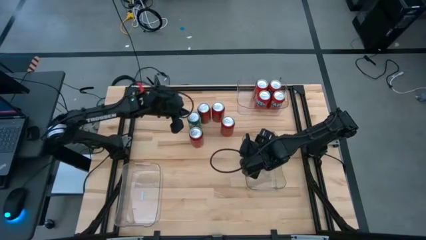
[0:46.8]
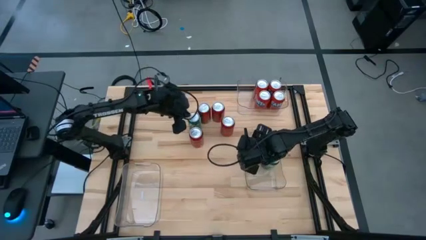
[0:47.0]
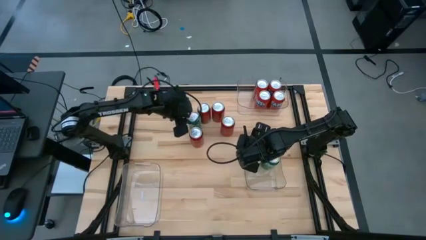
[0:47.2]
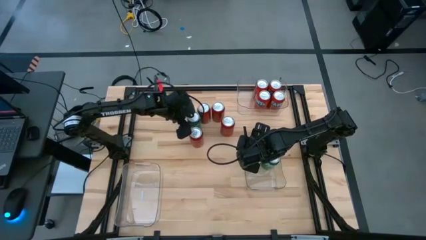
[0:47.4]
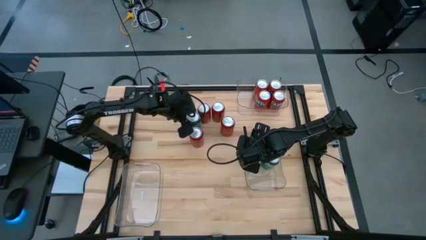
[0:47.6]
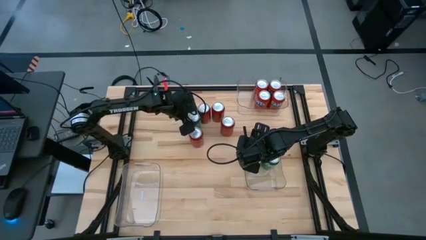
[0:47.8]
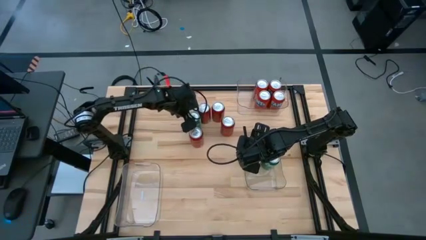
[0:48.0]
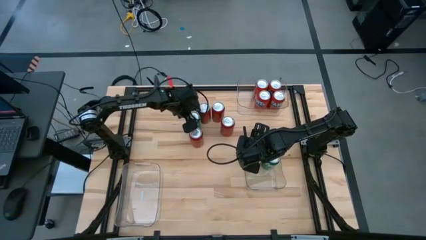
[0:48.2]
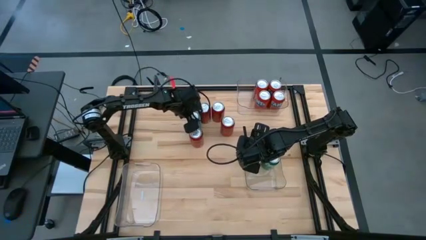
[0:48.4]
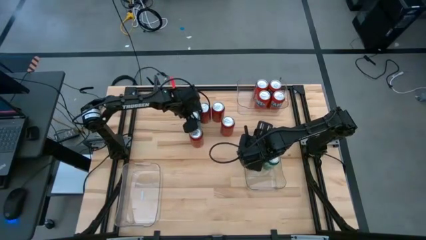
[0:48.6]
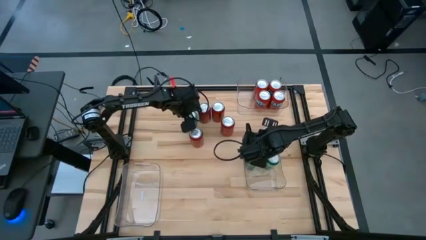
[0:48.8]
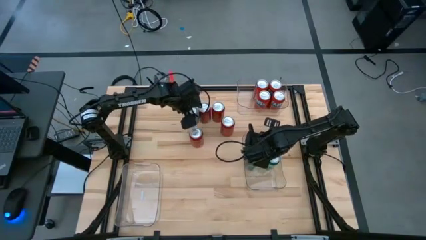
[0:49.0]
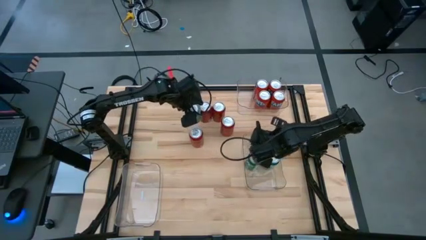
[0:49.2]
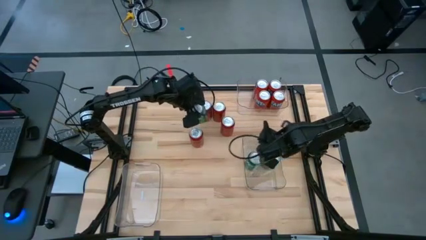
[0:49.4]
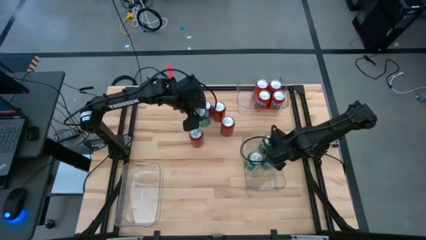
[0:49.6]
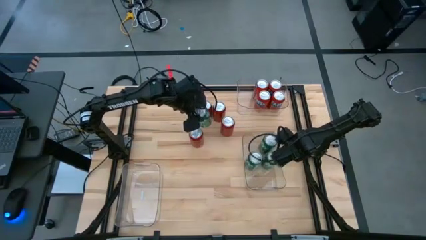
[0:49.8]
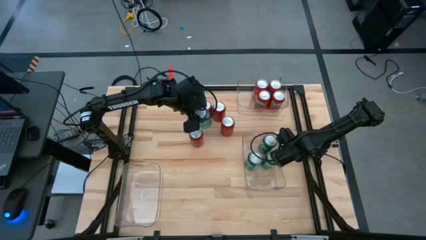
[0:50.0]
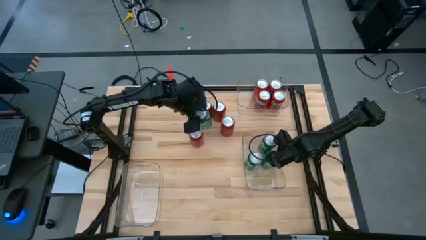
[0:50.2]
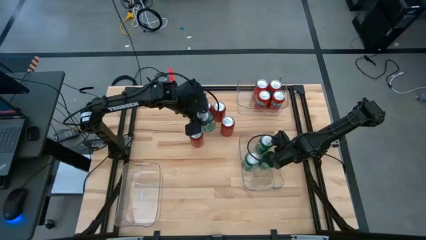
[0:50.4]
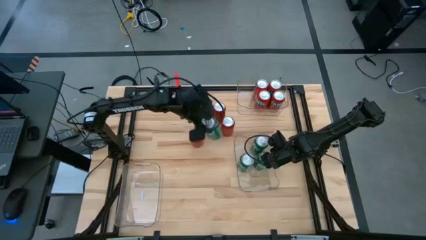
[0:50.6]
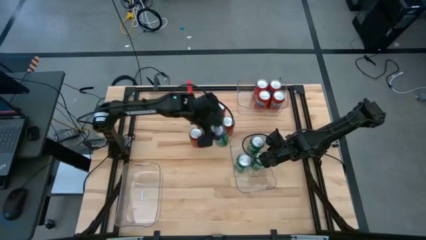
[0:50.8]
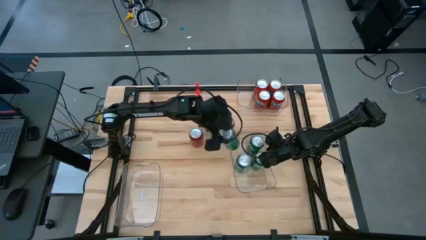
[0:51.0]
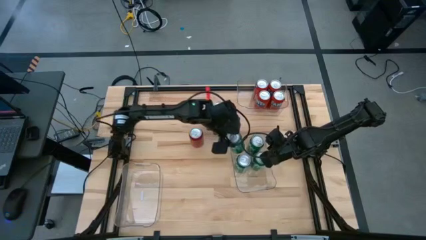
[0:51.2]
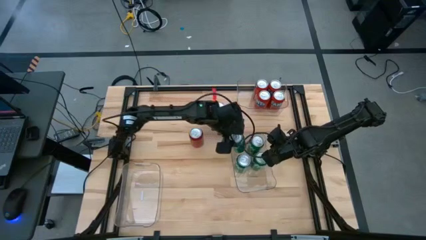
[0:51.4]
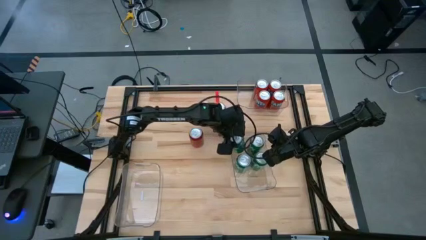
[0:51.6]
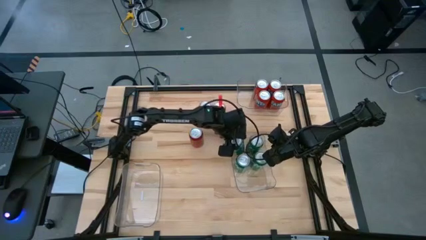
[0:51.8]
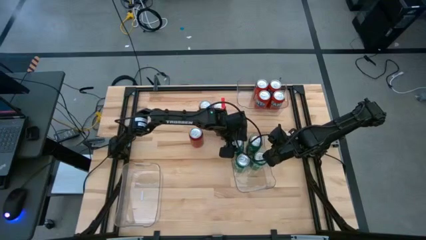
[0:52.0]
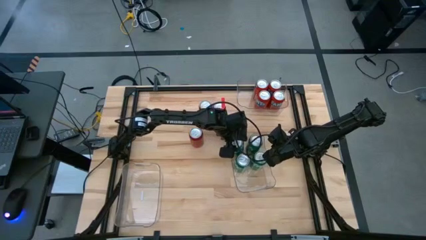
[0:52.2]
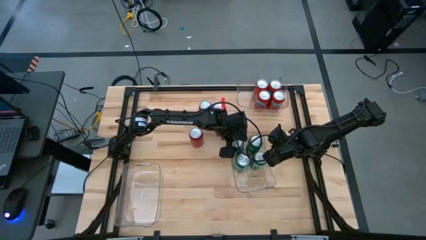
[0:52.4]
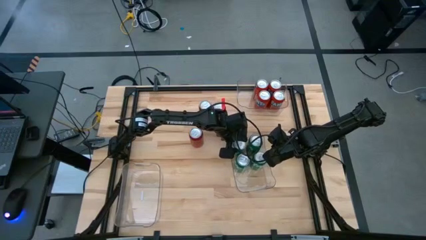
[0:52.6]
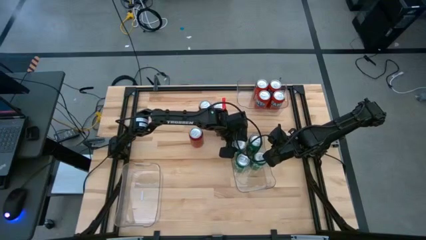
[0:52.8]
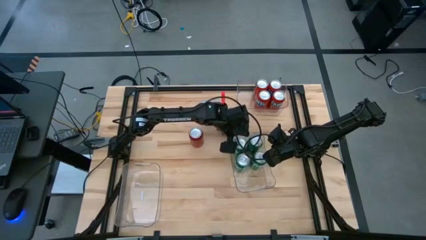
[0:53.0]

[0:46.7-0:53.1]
Task: Sort soda cans
Put the green soda can into the bottom right transparent bin

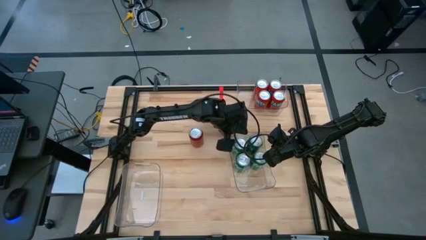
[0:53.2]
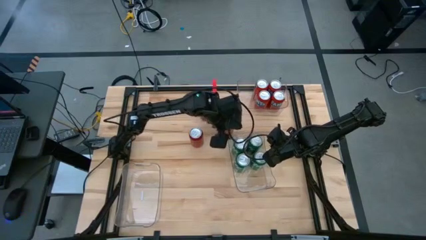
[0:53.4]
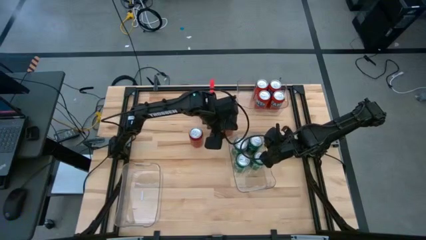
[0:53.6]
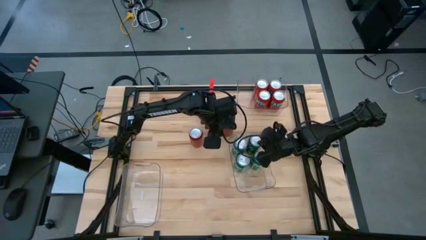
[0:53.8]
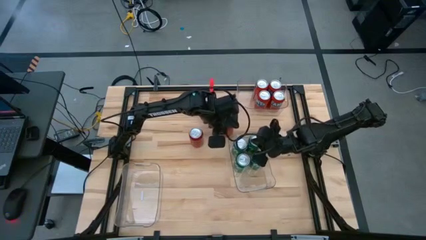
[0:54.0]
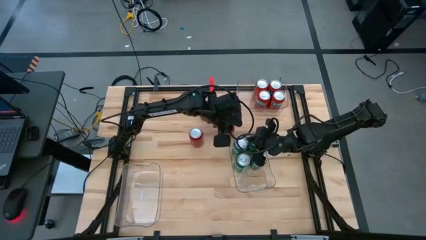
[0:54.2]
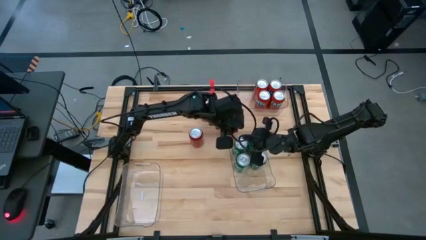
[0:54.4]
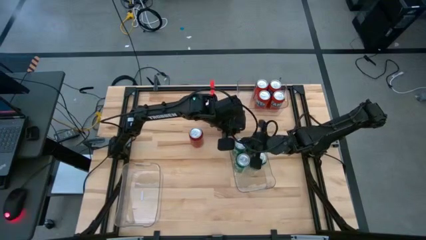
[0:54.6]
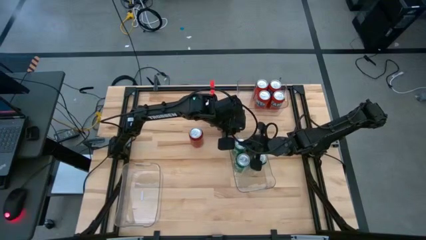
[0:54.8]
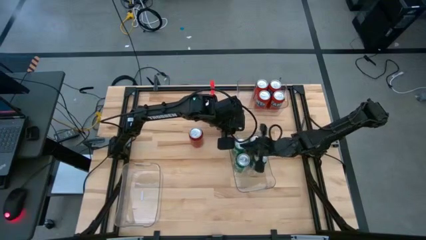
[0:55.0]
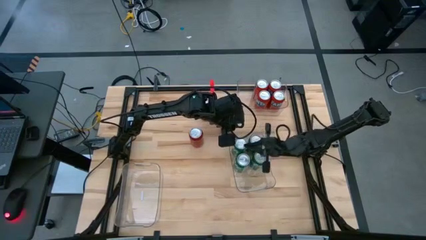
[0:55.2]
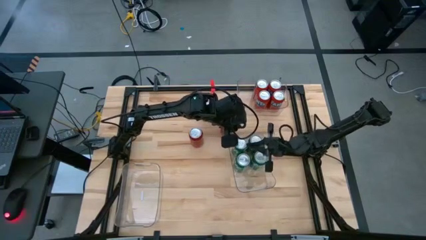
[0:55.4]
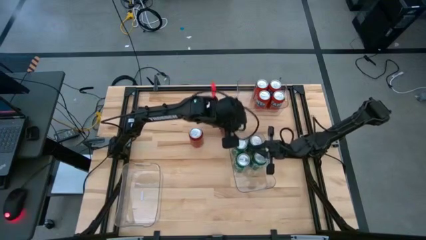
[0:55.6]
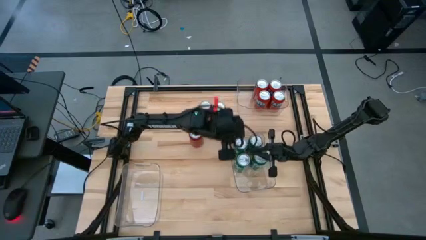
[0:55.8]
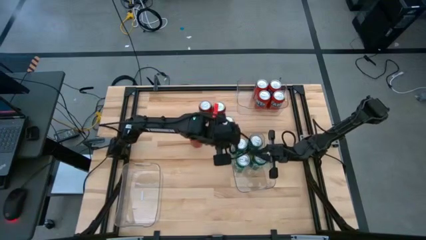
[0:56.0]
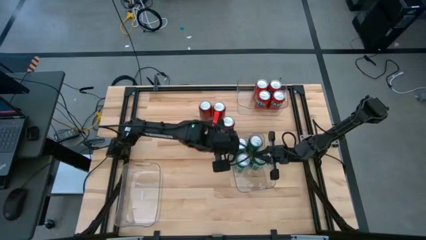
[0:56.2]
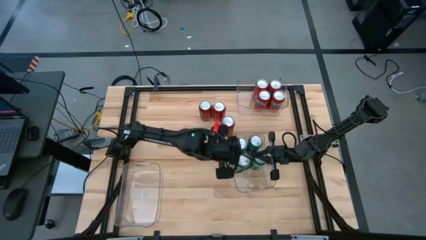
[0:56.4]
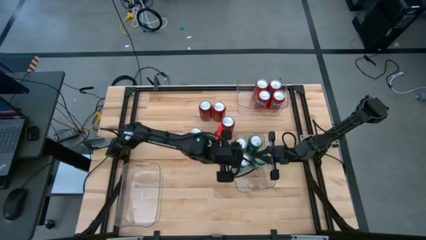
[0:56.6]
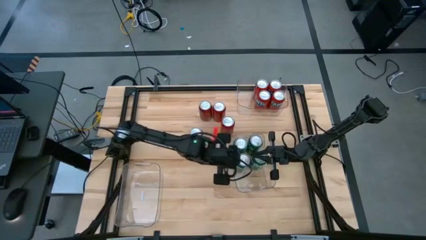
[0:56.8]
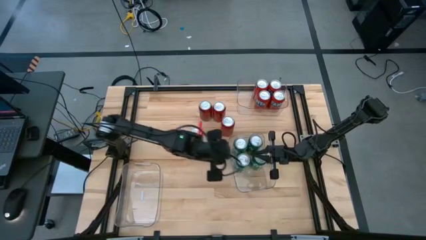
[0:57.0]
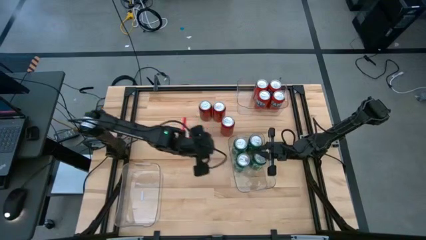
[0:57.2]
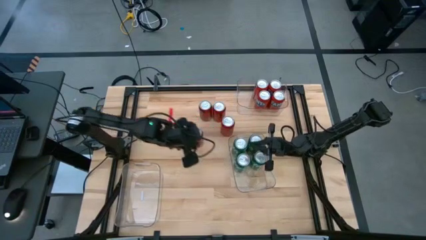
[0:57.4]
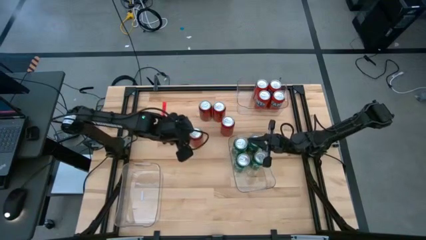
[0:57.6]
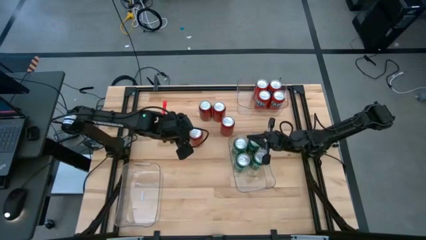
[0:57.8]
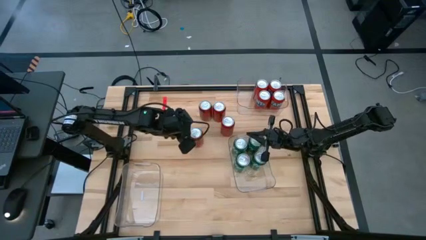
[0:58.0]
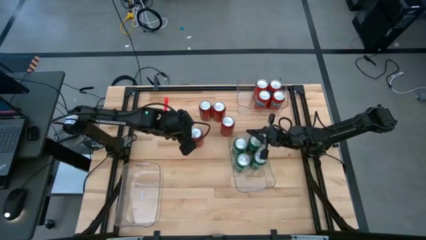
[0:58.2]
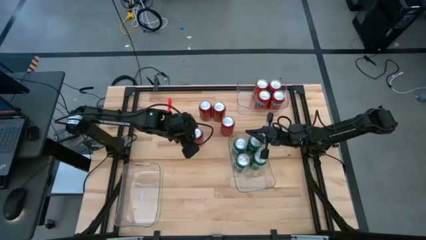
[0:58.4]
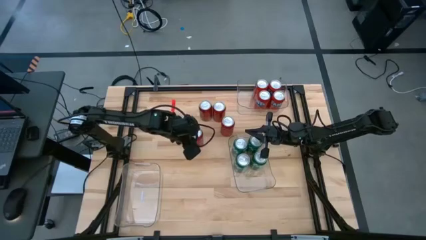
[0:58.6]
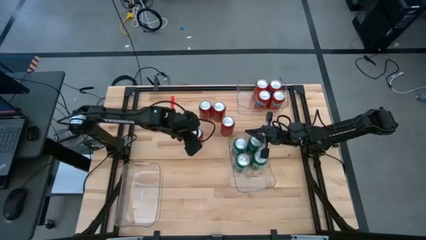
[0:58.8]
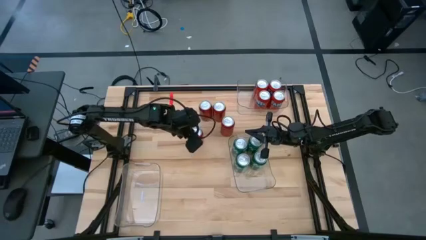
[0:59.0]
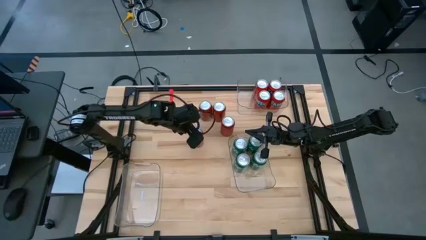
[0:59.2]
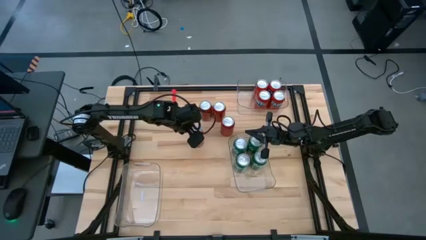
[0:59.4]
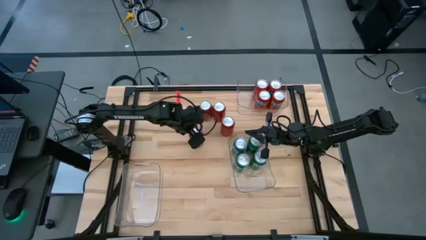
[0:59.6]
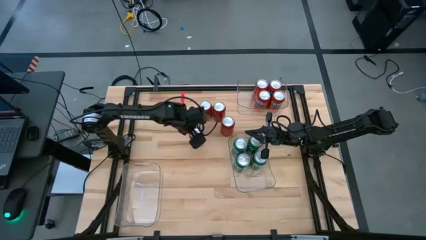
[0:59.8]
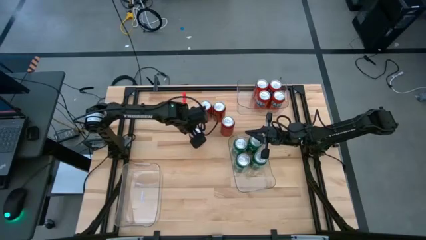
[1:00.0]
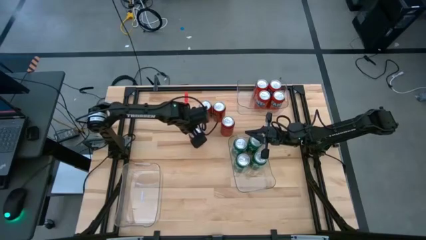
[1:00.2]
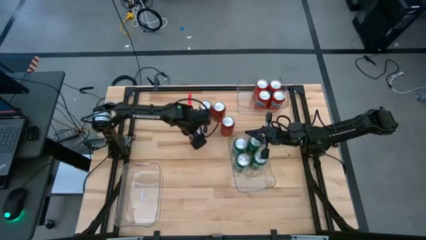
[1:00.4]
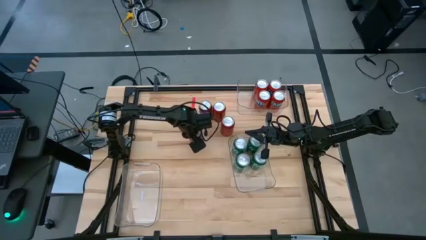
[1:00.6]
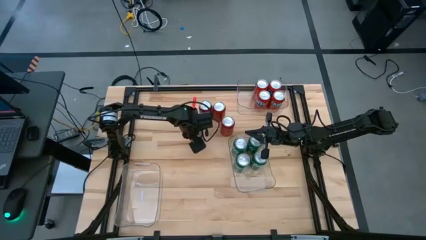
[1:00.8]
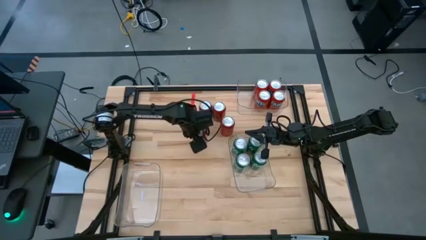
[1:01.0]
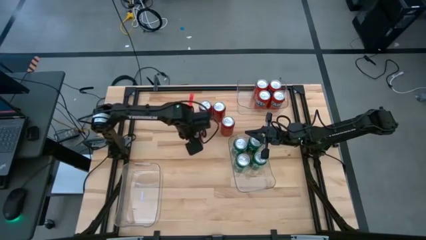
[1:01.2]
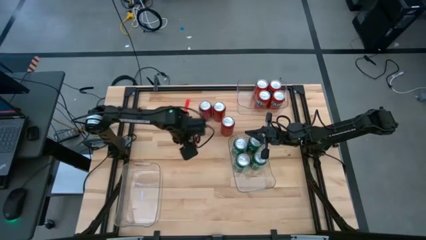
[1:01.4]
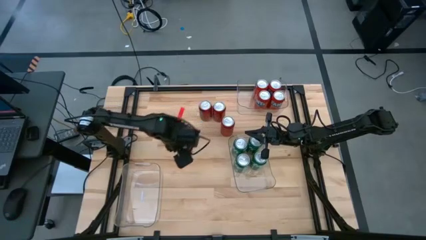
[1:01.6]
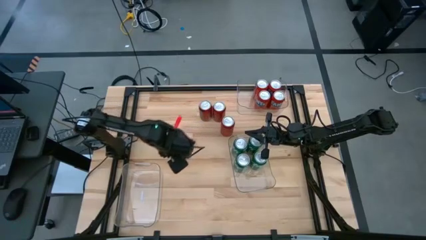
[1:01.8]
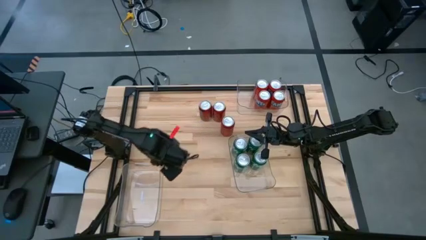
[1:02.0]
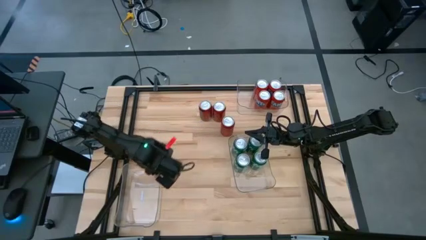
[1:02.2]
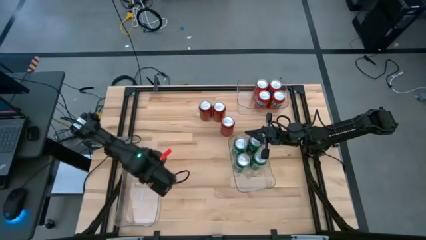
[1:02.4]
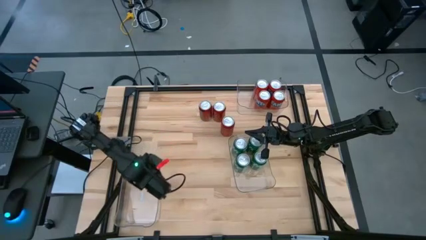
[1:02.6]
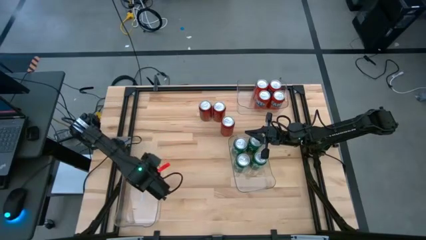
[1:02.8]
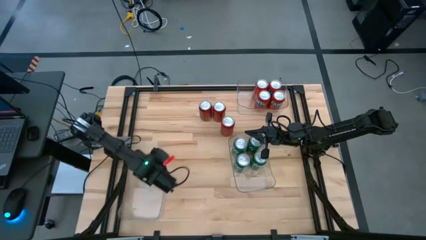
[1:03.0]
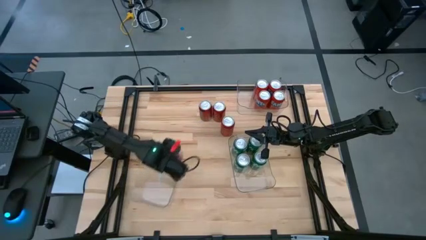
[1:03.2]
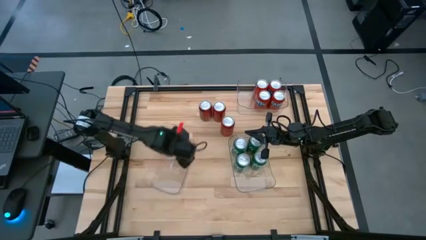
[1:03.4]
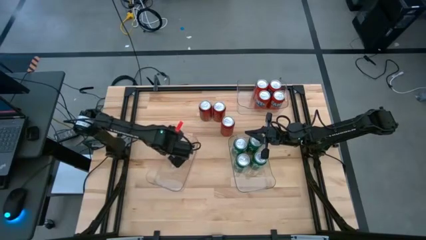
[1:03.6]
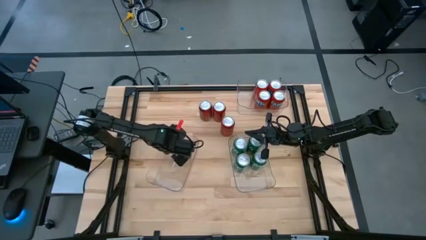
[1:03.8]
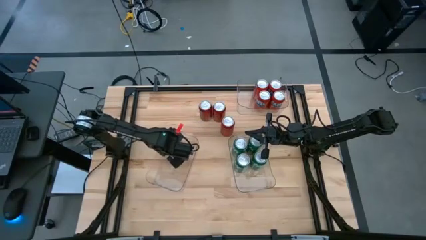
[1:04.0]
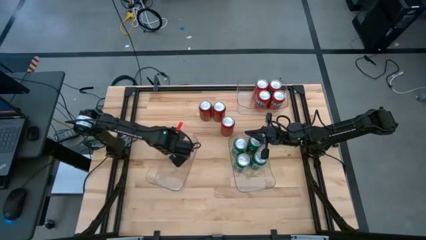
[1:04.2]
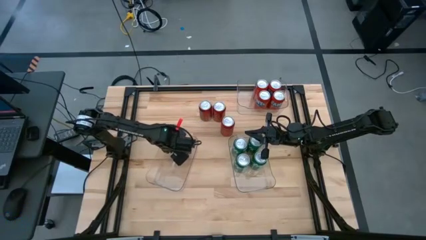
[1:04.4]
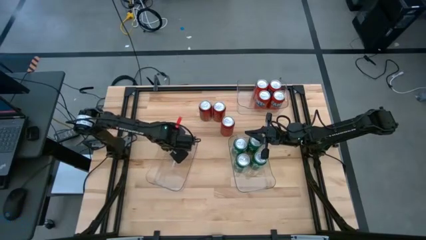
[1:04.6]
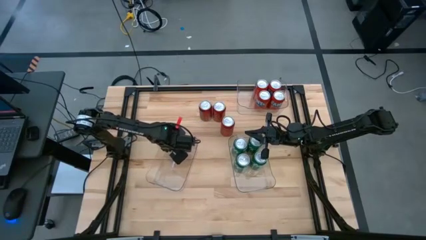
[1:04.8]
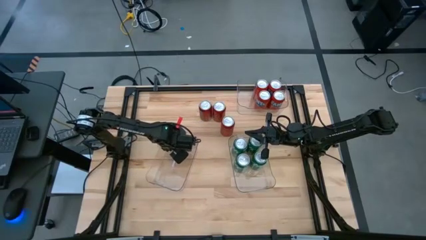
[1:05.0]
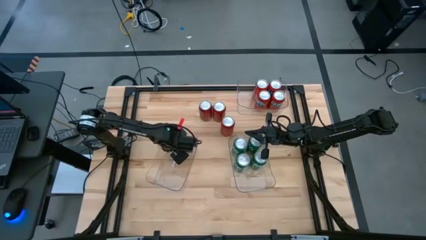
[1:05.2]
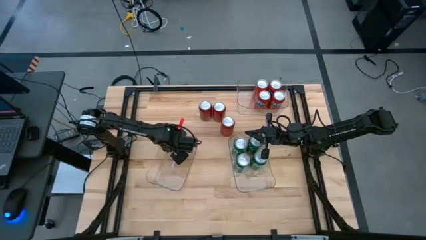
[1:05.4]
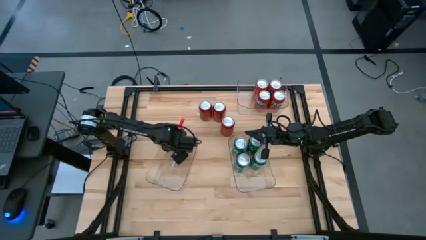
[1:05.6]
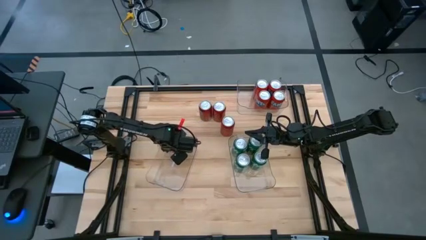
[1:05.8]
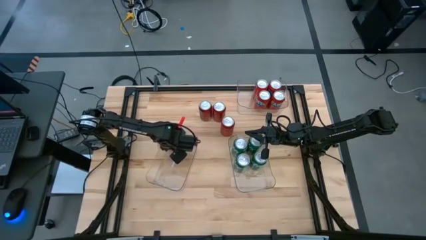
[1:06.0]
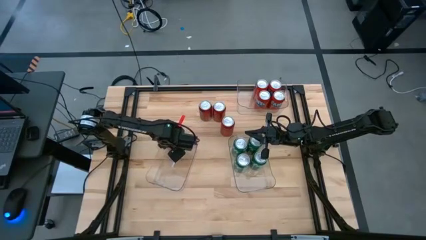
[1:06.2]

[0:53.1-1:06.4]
Put the bottom left red soda can into the bottom left transparent bin
